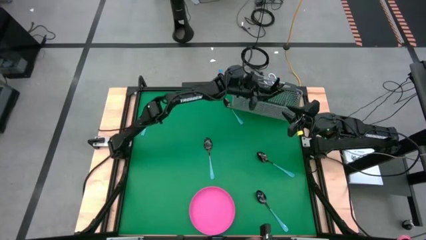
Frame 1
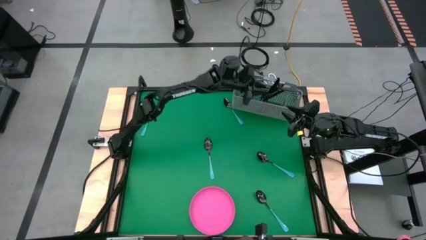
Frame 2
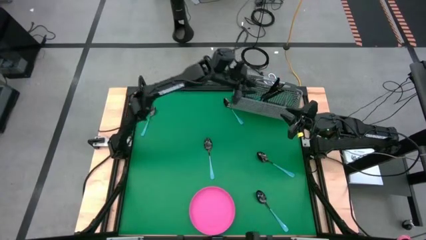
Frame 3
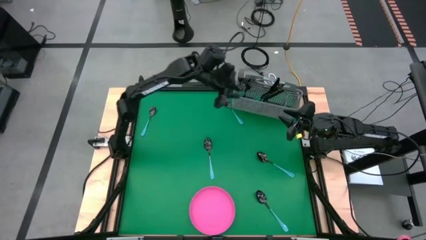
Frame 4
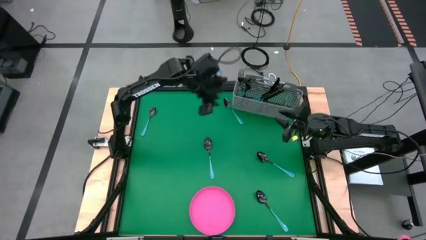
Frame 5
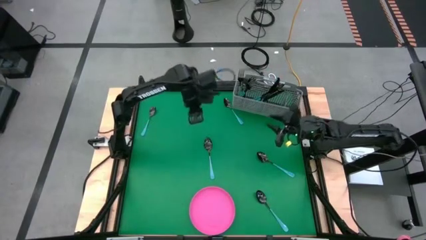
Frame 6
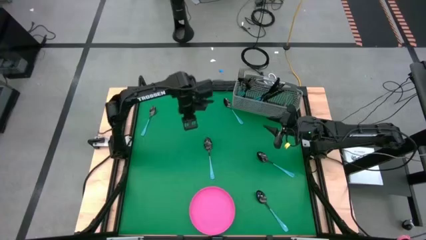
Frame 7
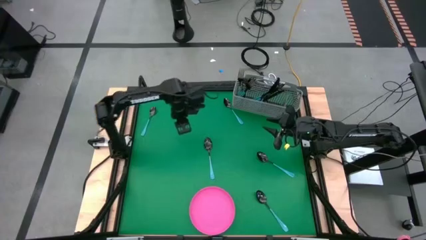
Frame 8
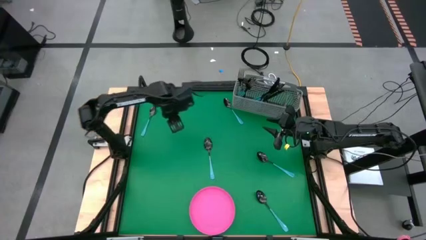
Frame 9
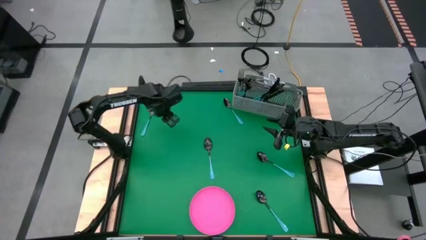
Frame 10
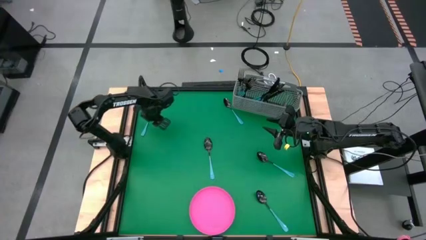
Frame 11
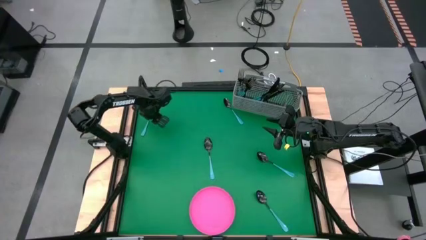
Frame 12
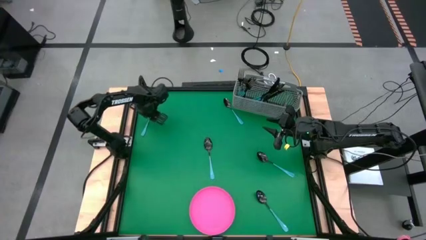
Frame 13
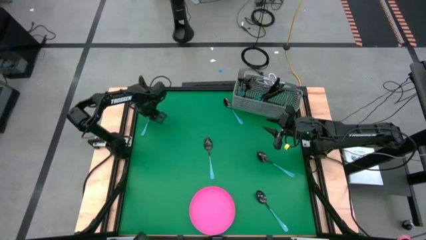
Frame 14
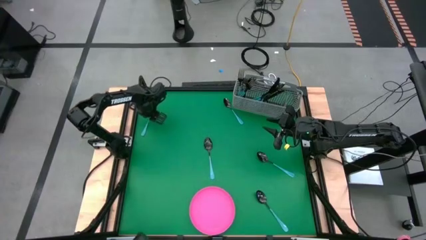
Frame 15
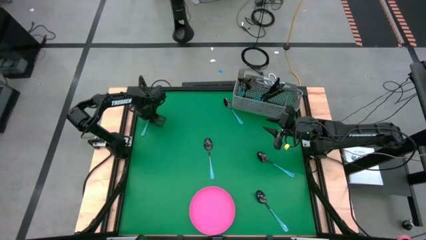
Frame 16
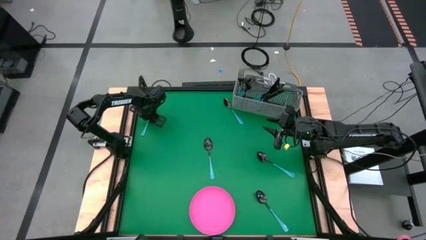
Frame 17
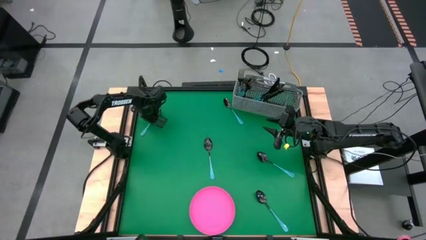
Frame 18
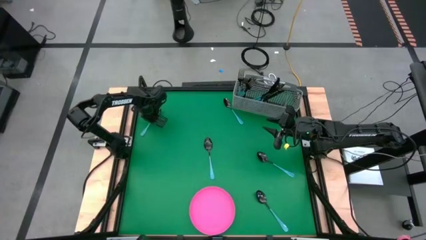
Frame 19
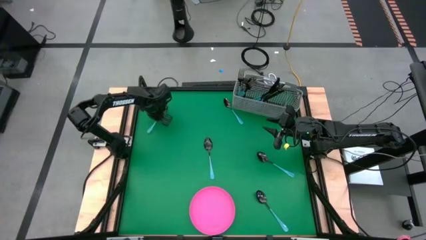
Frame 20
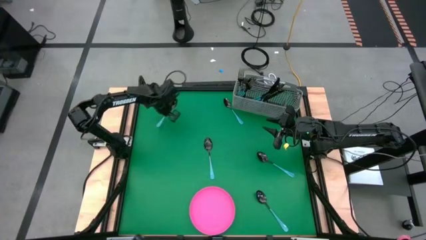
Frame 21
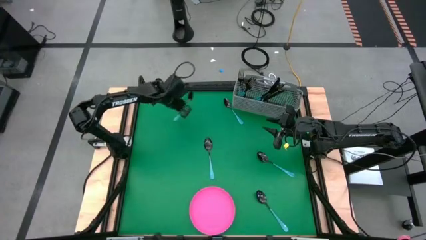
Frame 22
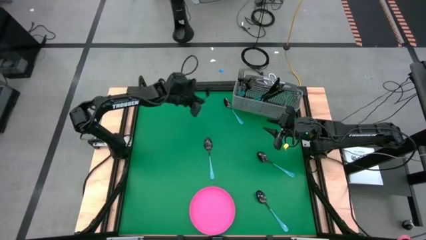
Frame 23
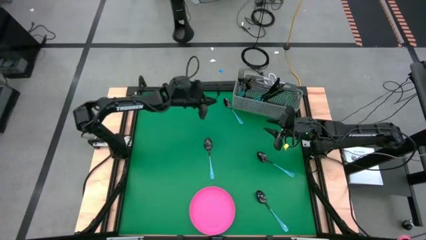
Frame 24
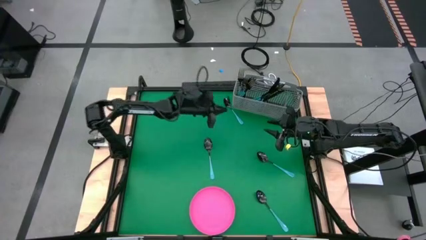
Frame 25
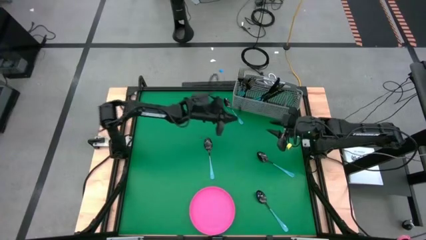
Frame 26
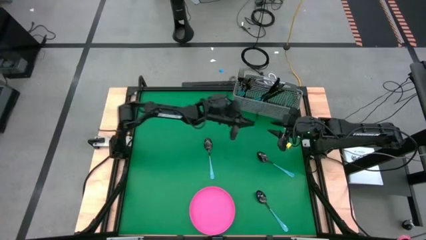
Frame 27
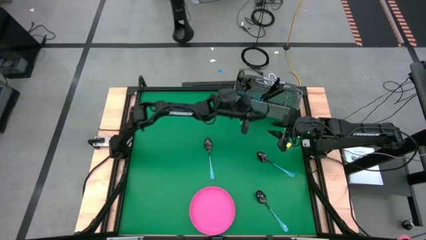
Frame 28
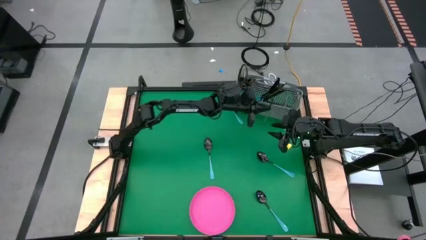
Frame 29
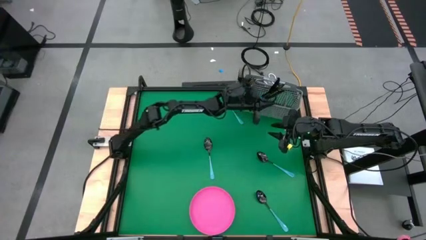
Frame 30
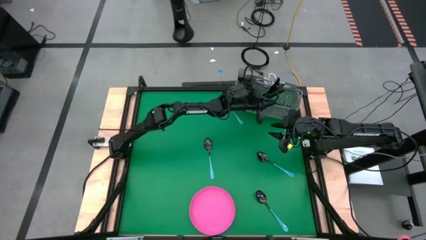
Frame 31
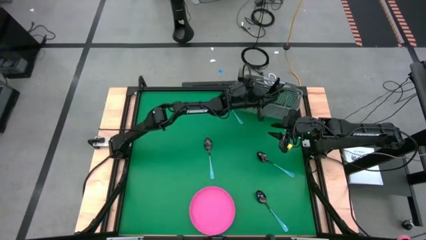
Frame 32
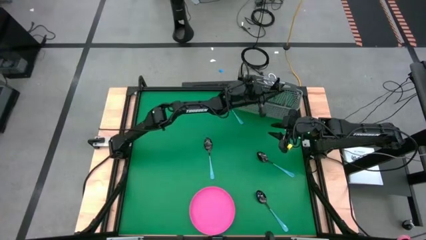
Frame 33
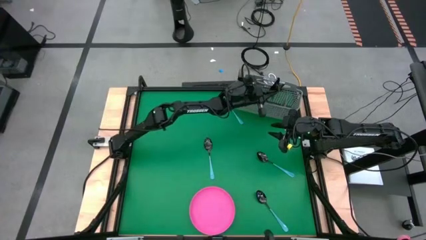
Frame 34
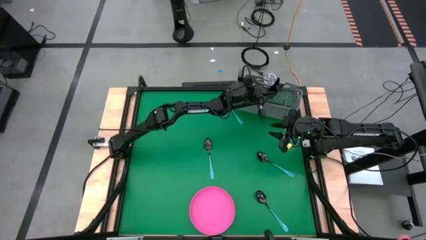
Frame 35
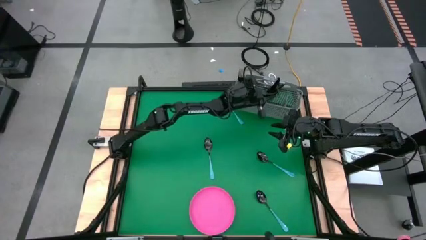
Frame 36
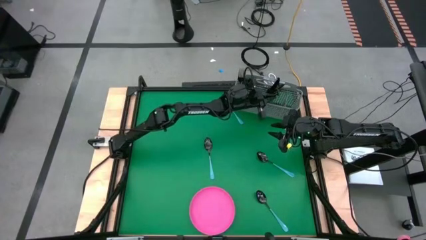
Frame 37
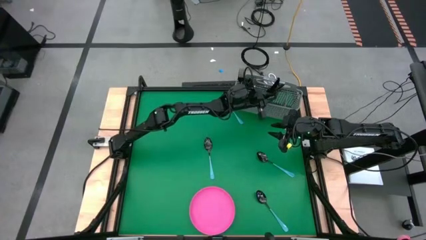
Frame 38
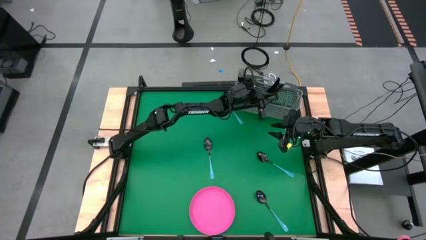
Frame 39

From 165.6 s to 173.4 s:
Task: Sort silverware
Put the blue spoon into the utensil holder

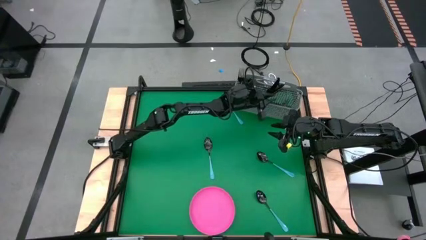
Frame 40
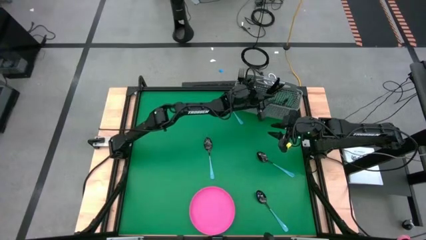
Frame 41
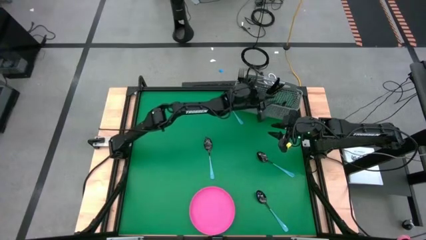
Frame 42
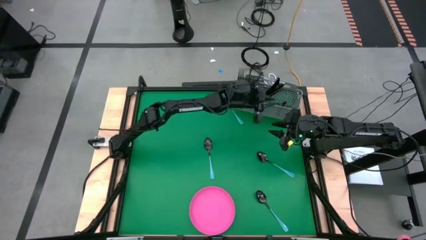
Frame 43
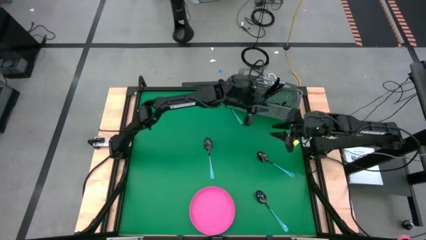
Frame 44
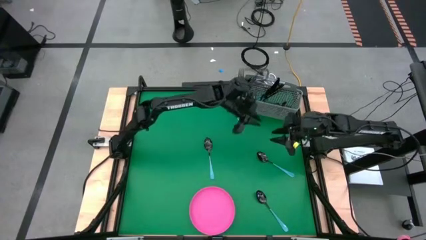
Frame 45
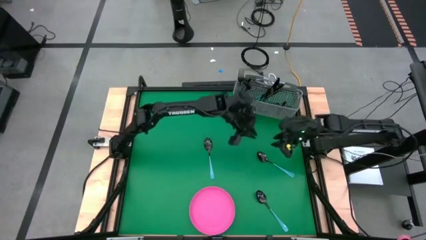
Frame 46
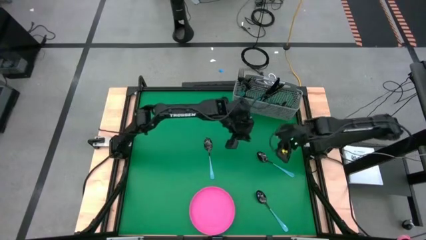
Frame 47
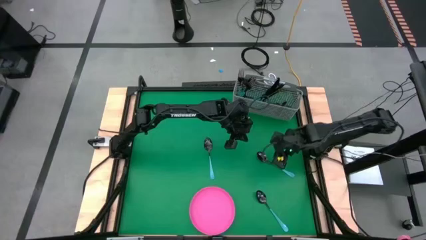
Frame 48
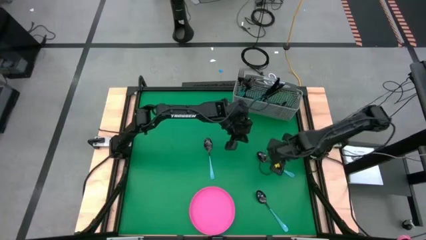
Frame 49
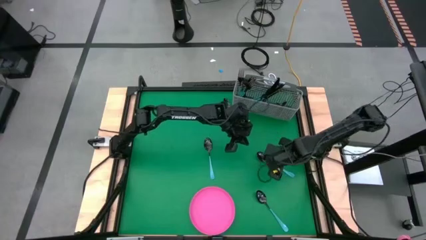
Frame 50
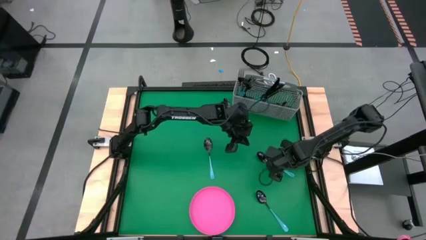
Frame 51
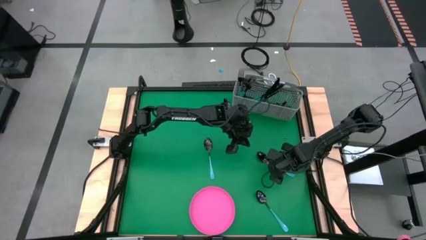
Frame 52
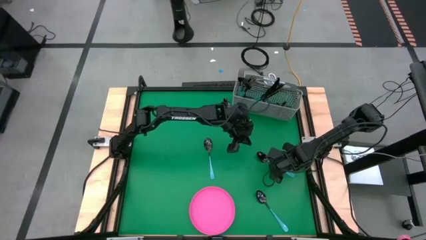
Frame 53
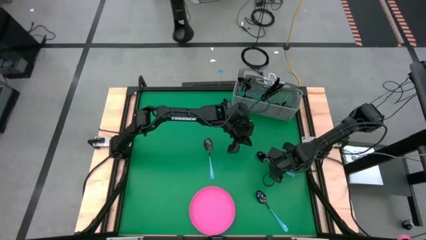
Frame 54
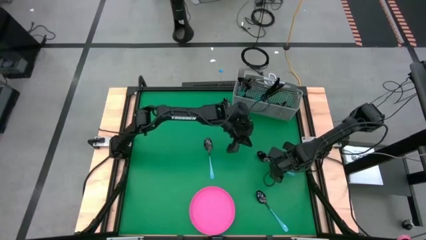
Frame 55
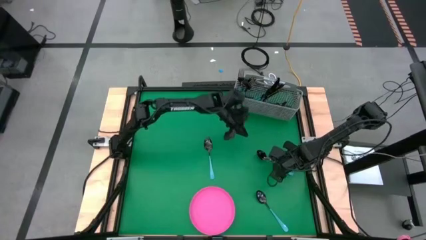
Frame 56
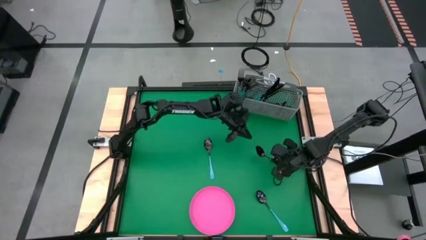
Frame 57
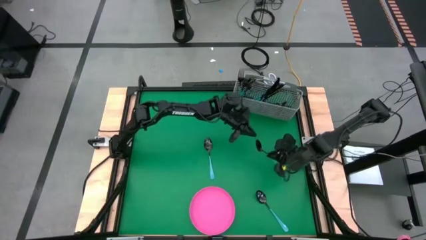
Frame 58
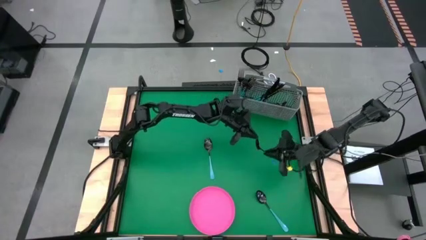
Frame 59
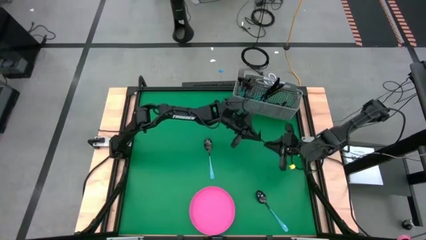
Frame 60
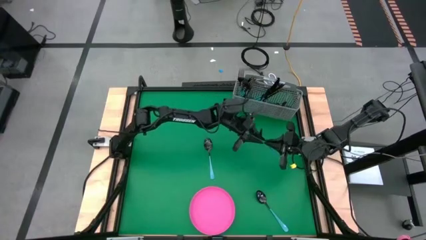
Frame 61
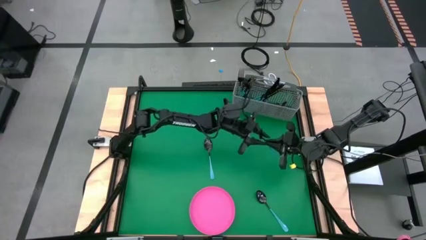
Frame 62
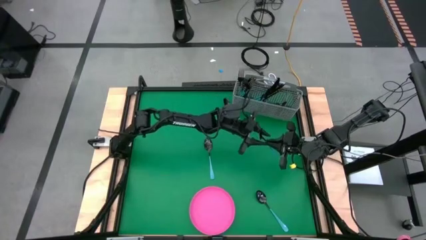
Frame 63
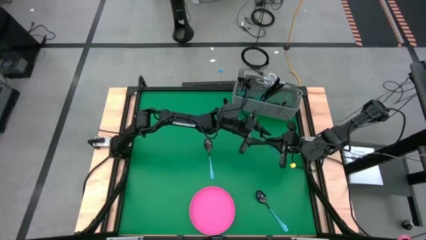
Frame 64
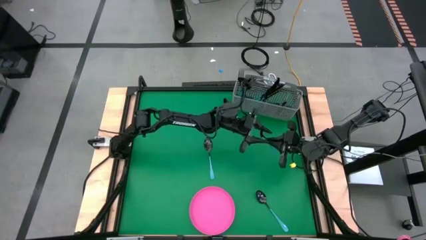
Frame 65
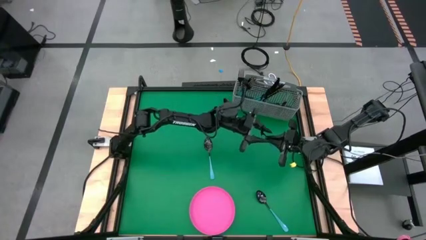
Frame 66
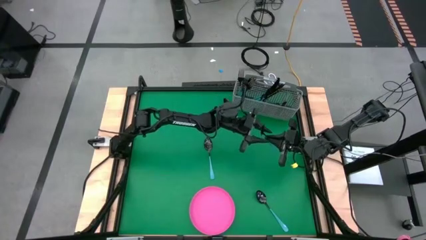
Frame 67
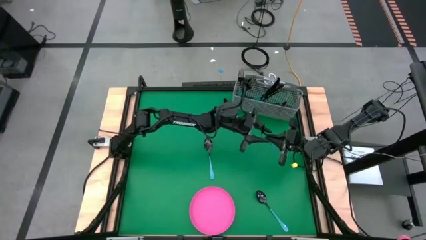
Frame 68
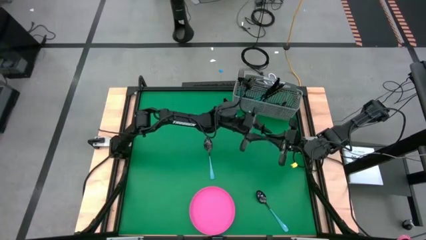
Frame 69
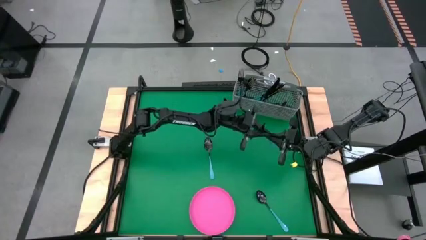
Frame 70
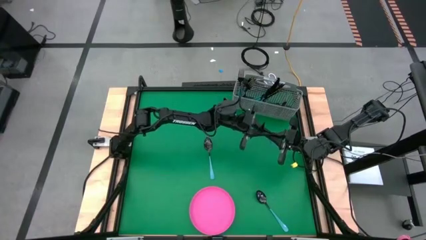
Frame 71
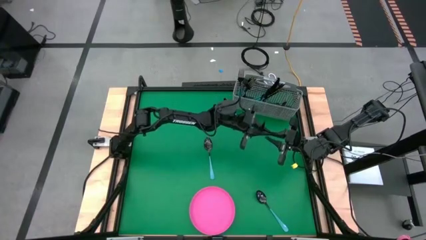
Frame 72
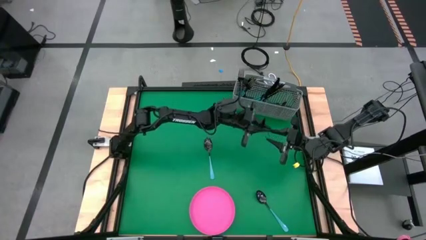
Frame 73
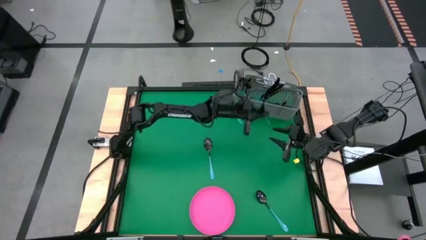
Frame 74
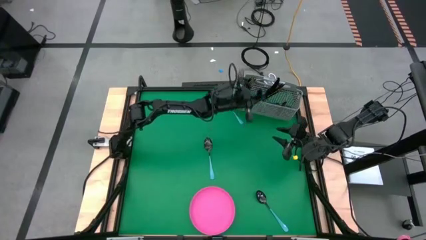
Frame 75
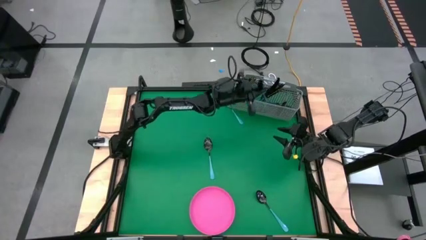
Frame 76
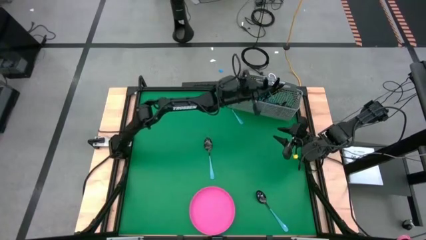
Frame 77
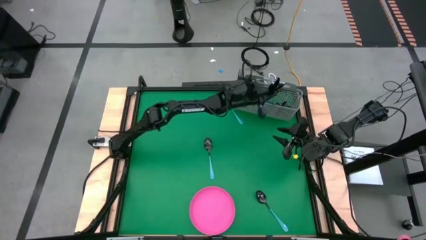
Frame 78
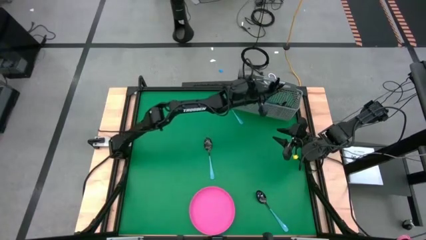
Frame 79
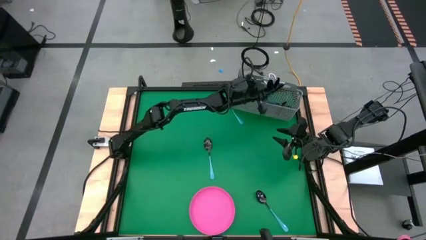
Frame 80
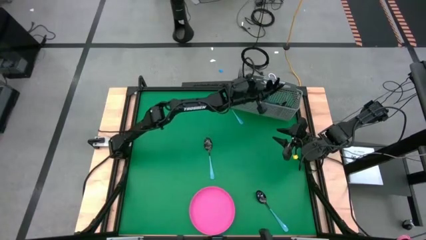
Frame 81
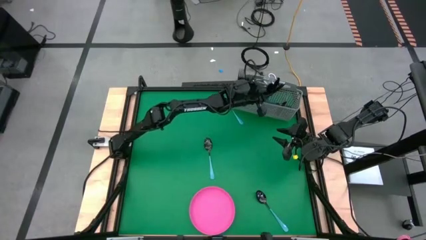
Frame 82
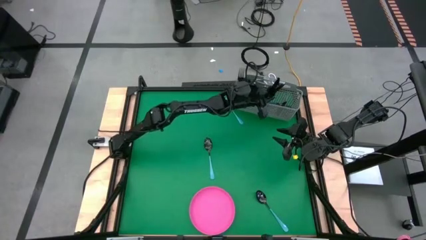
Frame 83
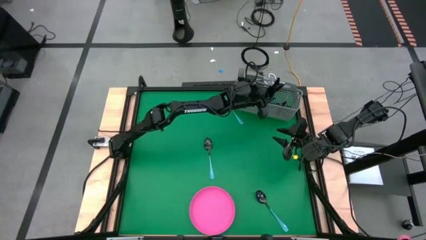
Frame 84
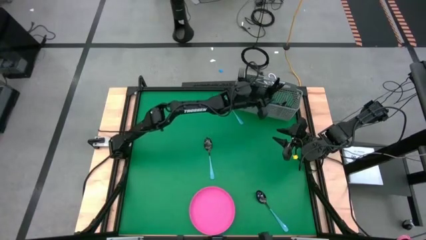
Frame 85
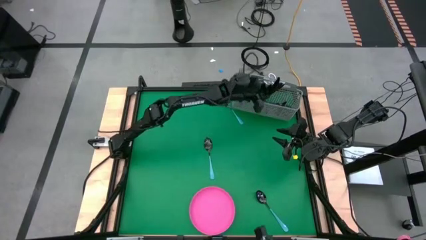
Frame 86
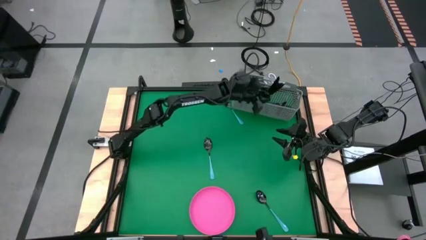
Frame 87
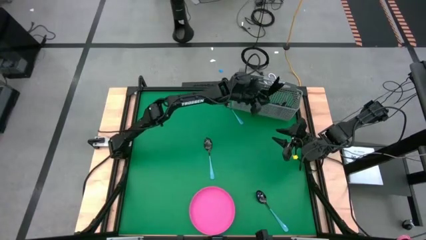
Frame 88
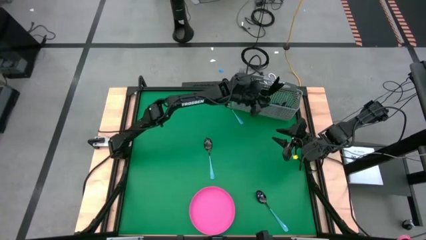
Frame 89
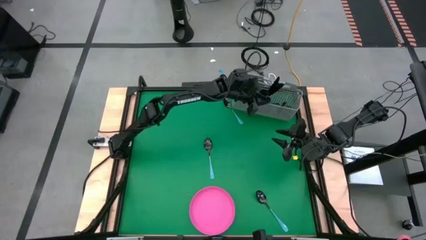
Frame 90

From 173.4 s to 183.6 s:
Put the blue spoon into the utensil holder
